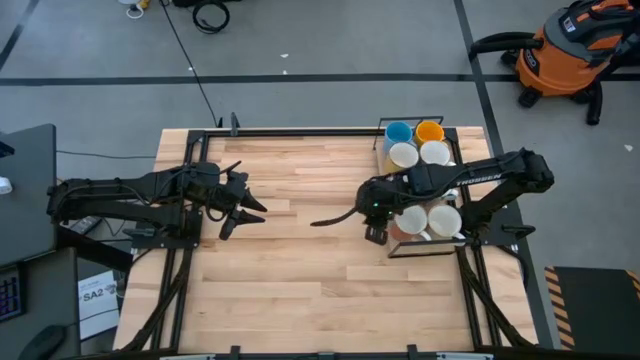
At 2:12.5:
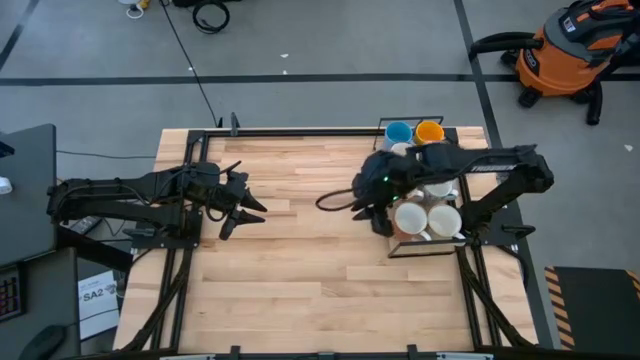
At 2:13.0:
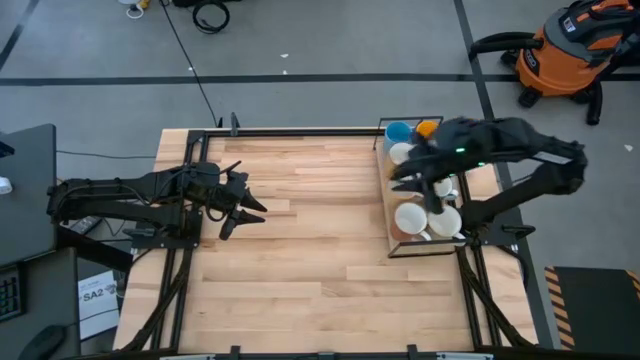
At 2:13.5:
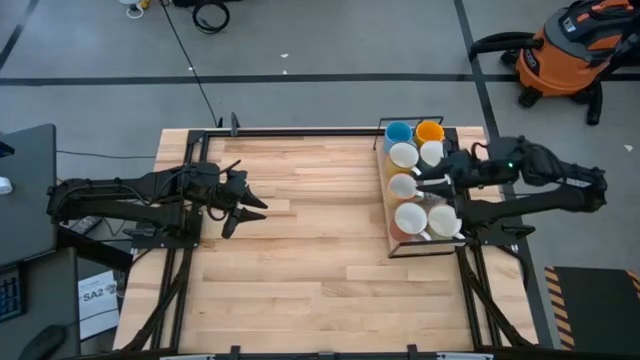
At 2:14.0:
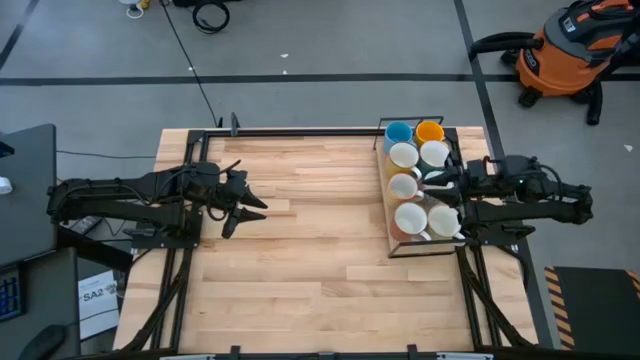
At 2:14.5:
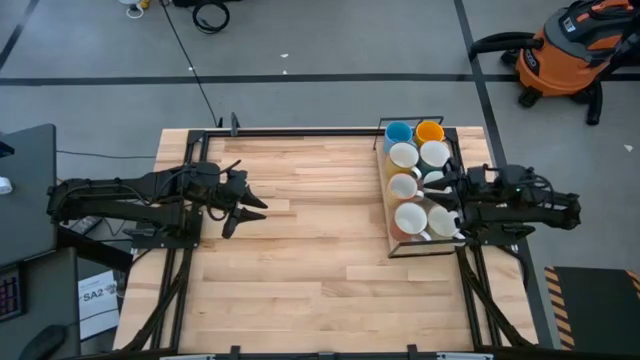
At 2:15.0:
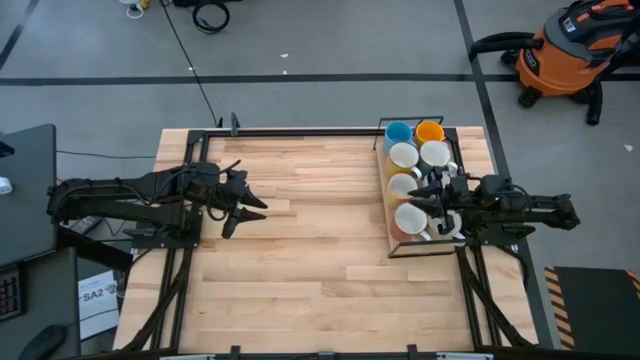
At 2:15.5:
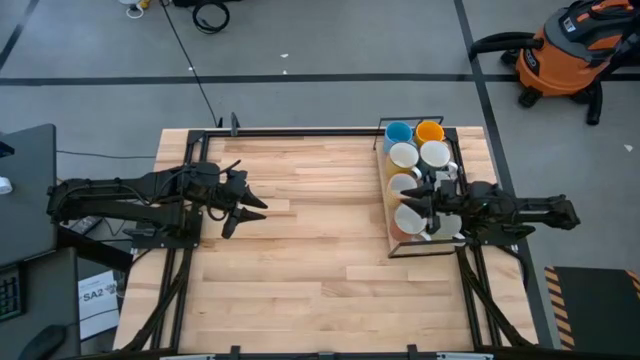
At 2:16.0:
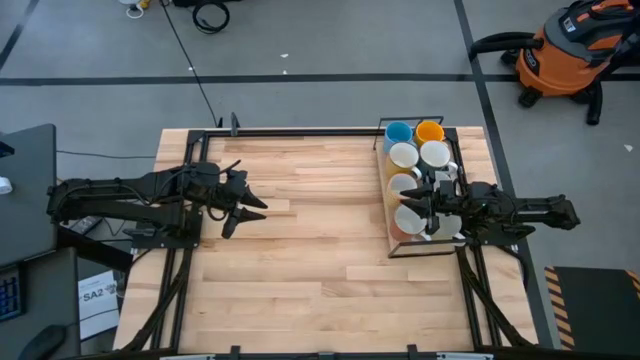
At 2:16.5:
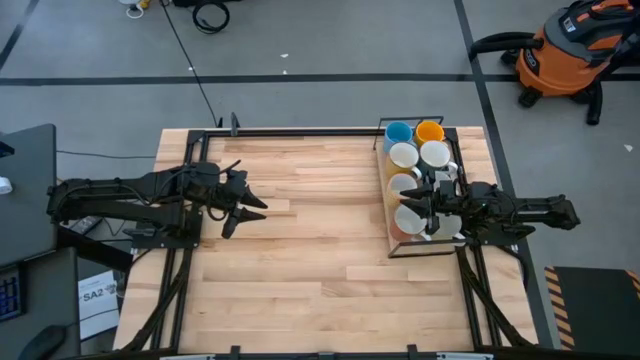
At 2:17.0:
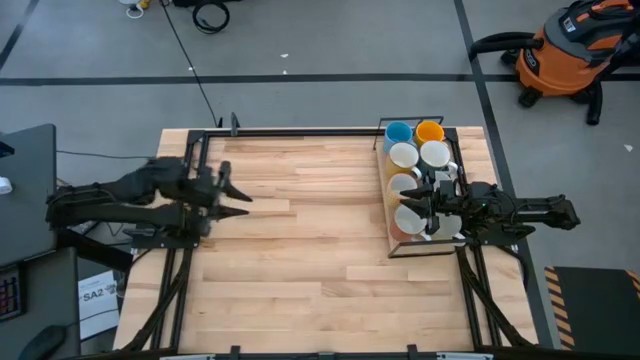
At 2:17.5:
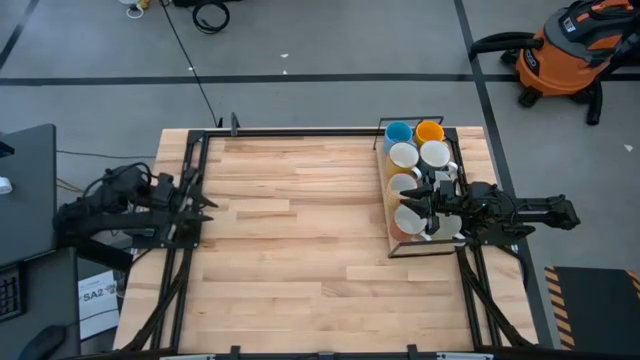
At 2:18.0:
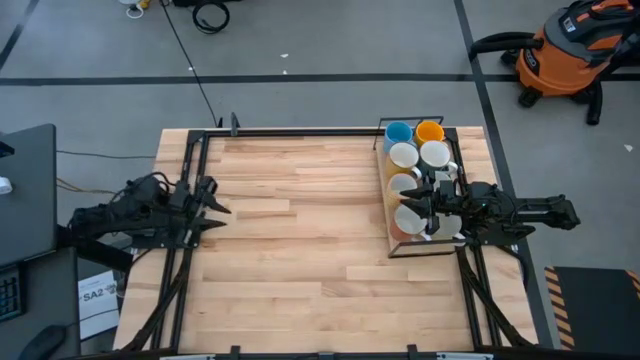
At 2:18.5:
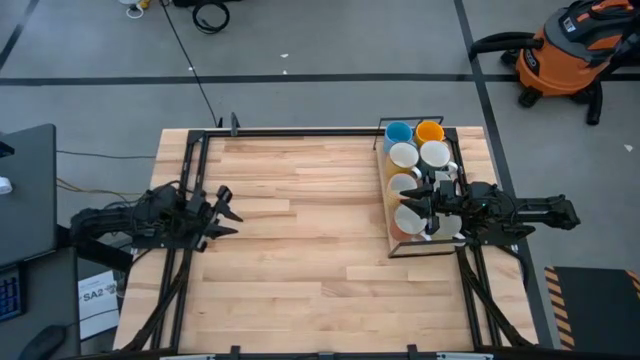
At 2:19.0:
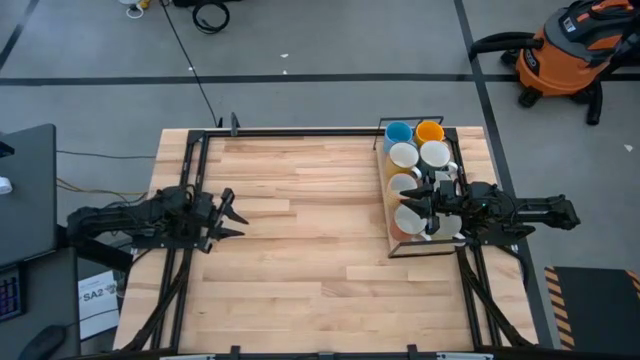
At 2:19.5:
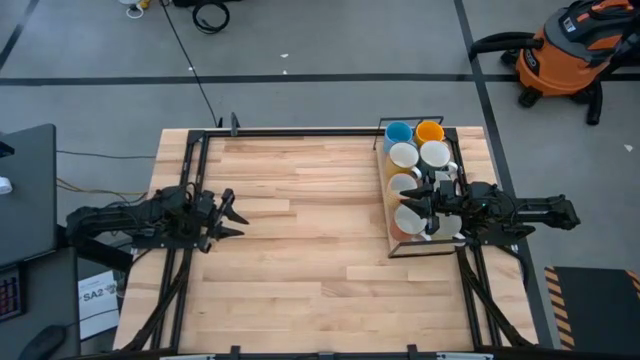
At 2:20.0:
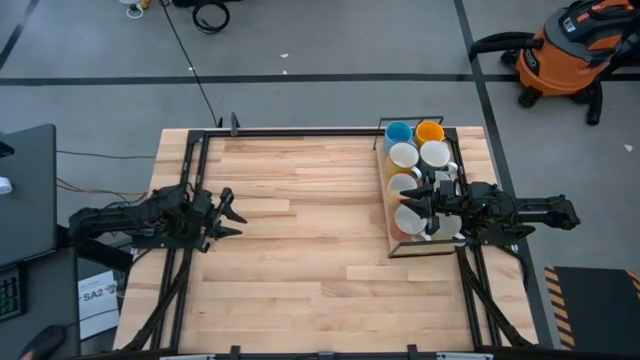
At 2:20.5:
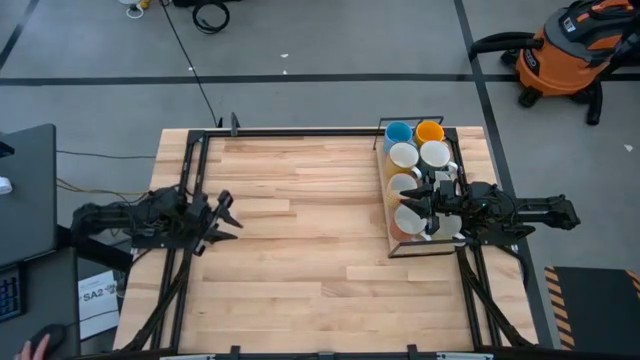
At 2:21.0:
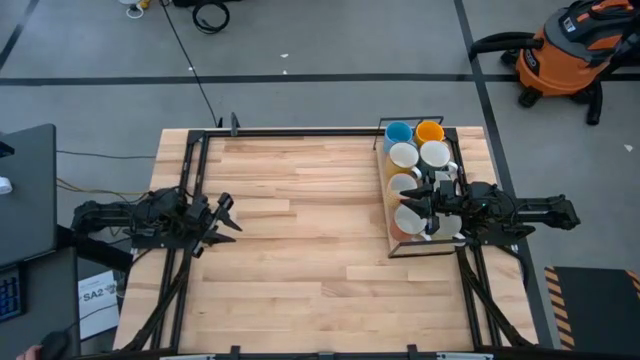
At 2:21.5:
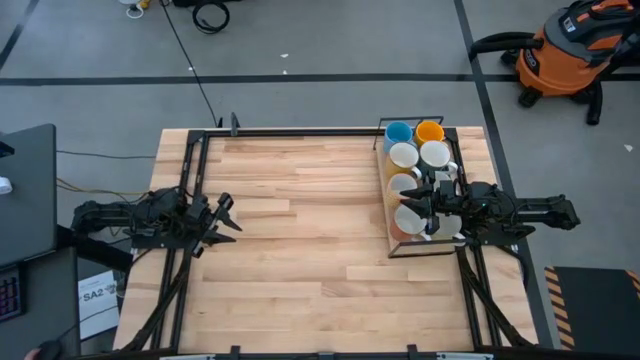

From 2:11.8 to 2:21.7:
Task: Place coffee mugs
Return to Home Position

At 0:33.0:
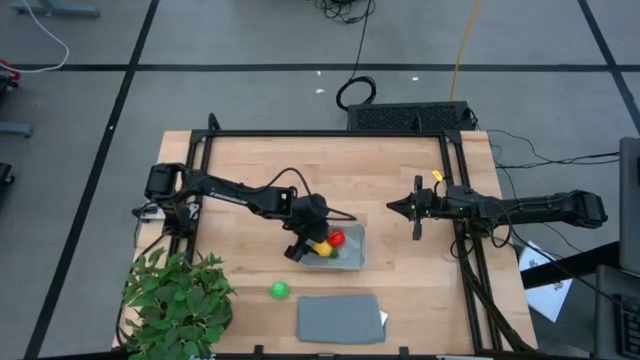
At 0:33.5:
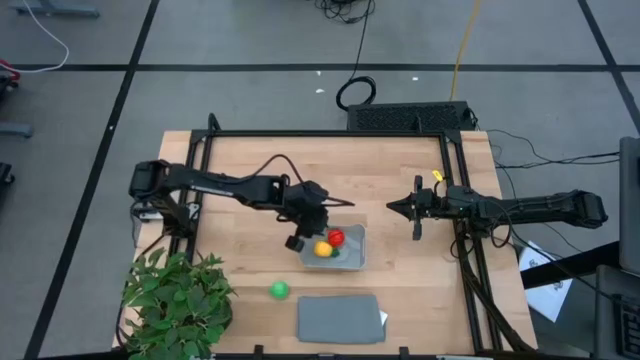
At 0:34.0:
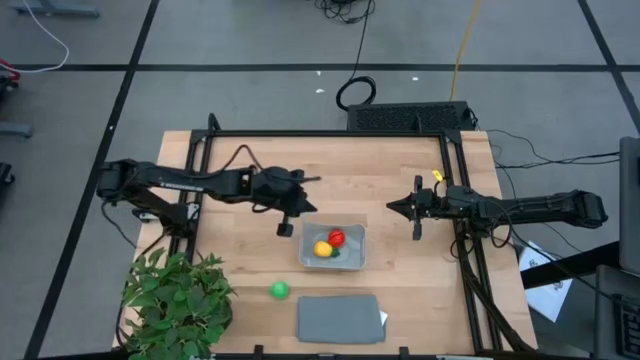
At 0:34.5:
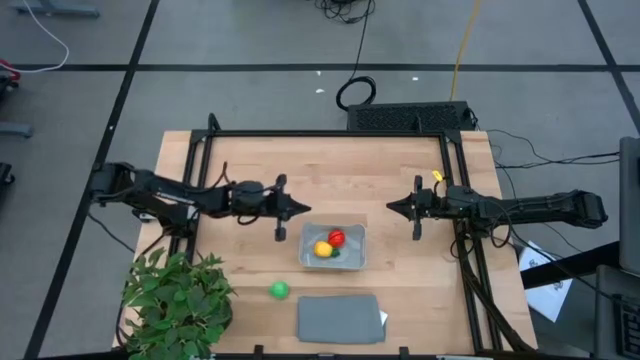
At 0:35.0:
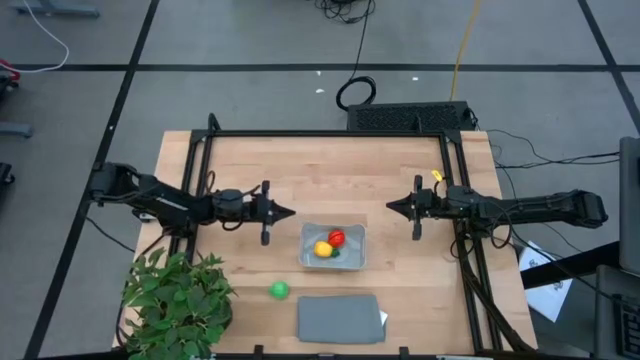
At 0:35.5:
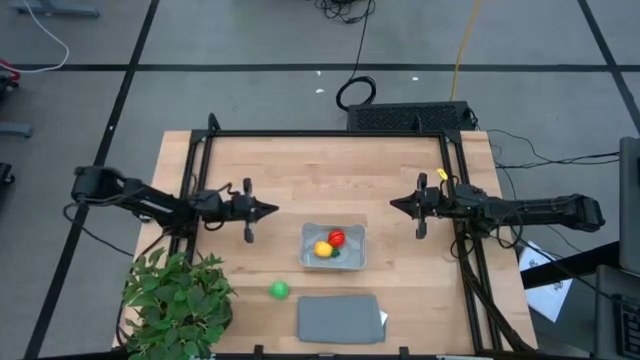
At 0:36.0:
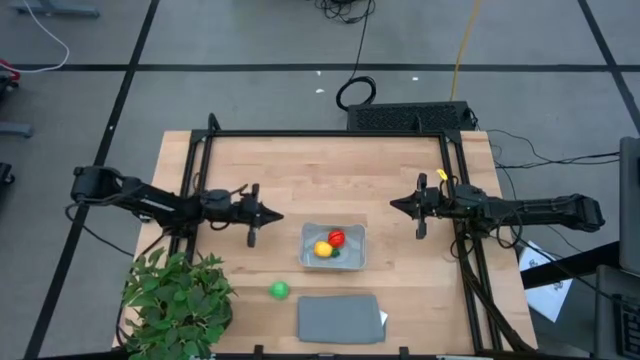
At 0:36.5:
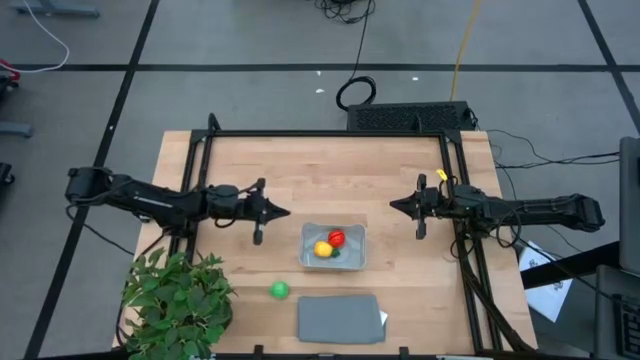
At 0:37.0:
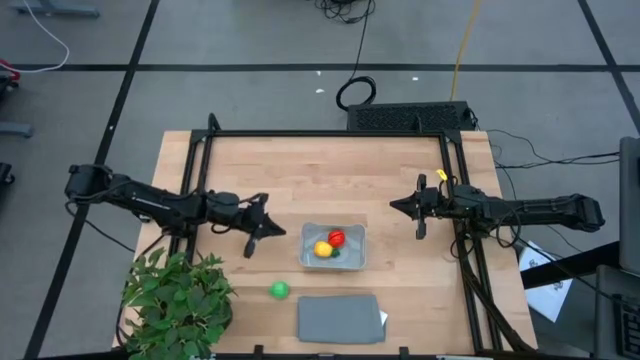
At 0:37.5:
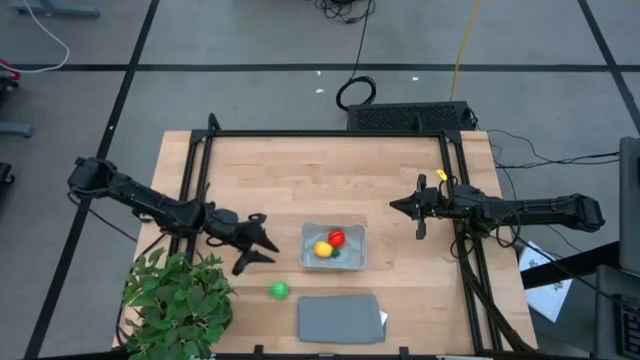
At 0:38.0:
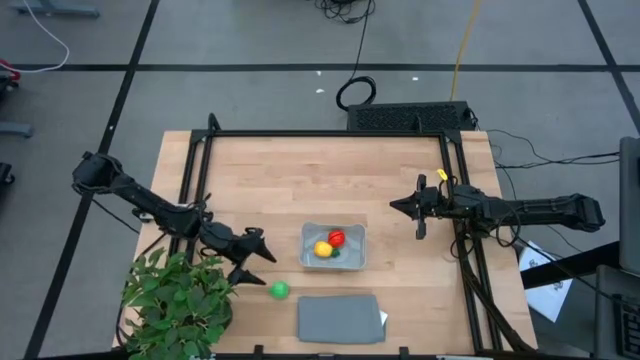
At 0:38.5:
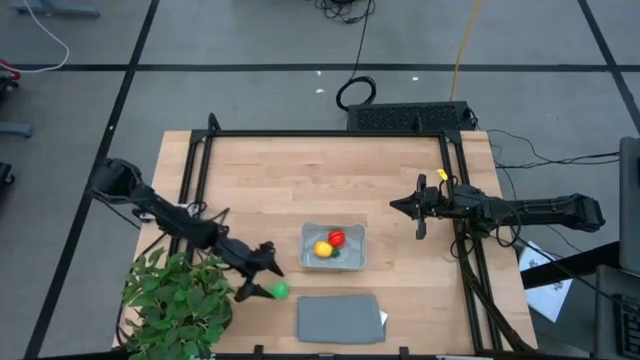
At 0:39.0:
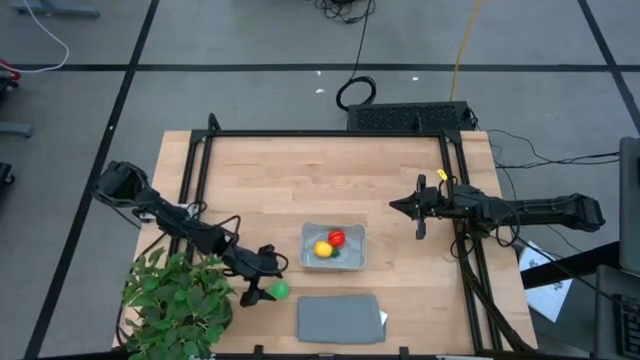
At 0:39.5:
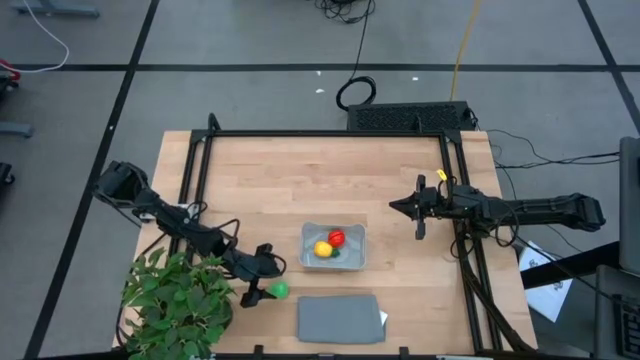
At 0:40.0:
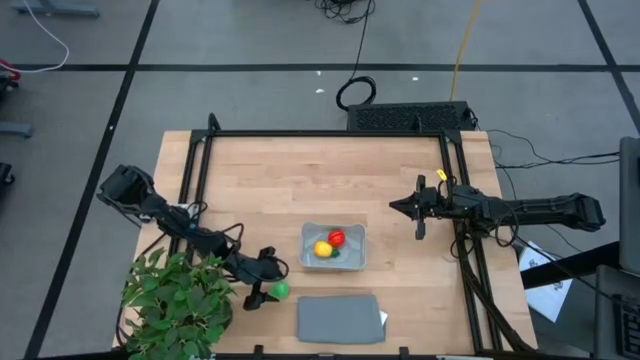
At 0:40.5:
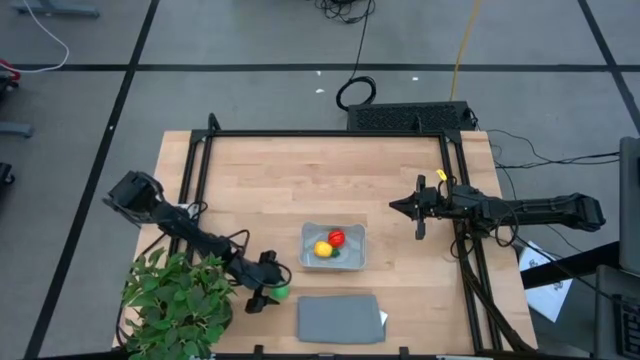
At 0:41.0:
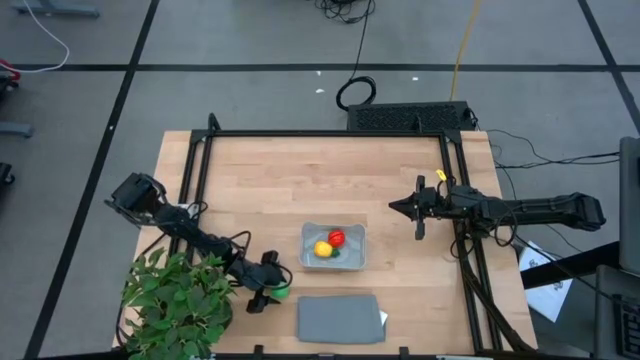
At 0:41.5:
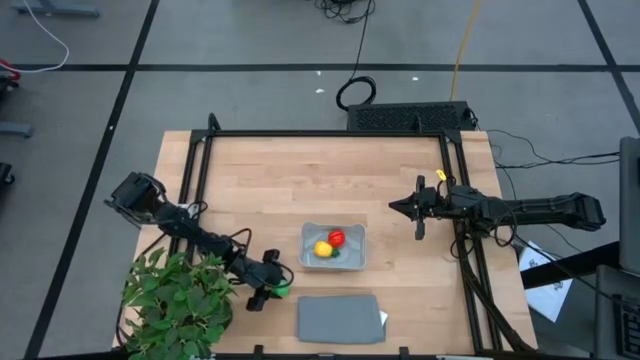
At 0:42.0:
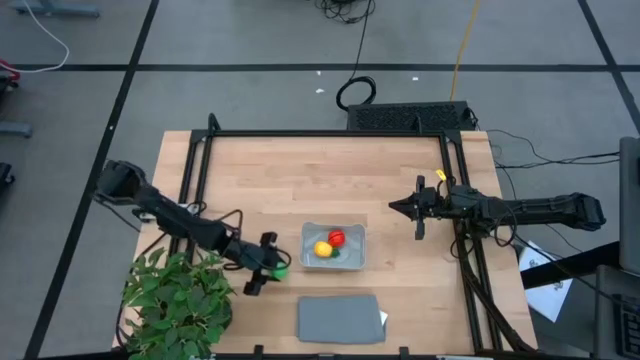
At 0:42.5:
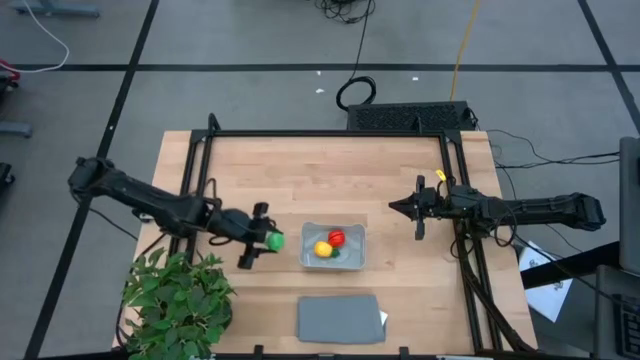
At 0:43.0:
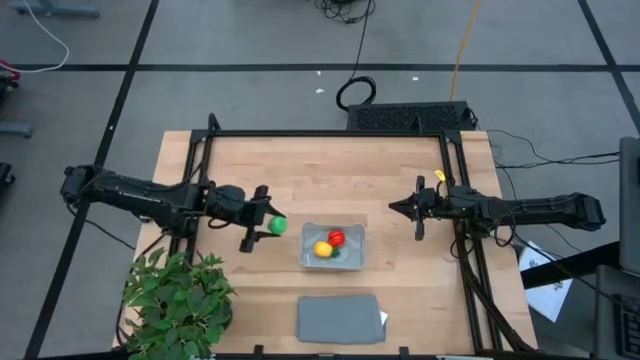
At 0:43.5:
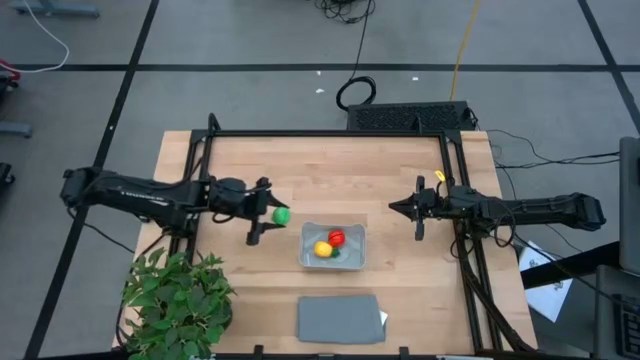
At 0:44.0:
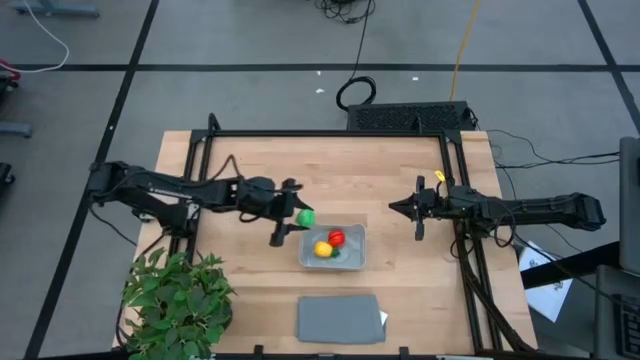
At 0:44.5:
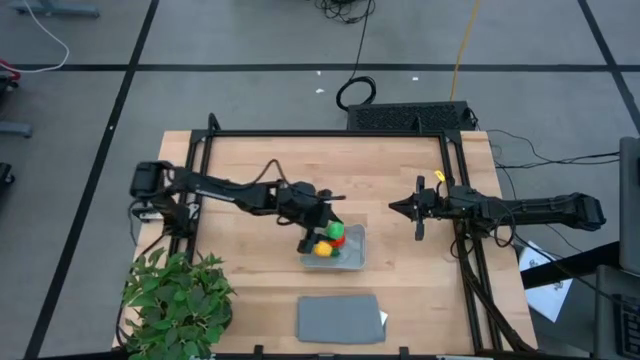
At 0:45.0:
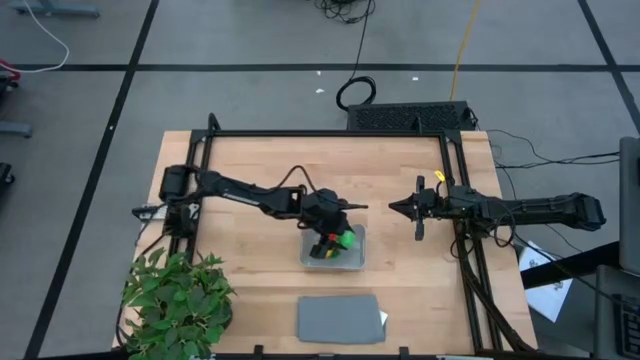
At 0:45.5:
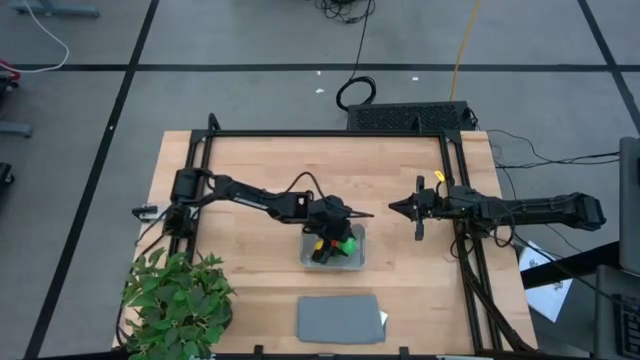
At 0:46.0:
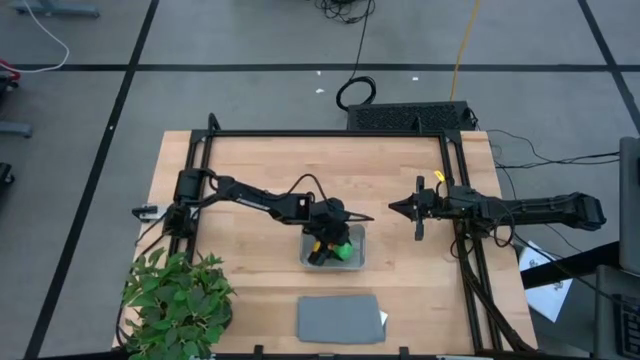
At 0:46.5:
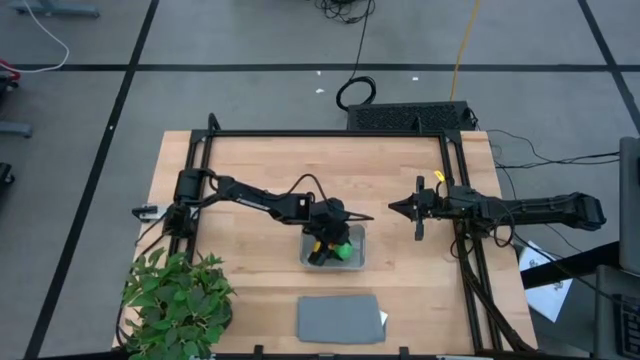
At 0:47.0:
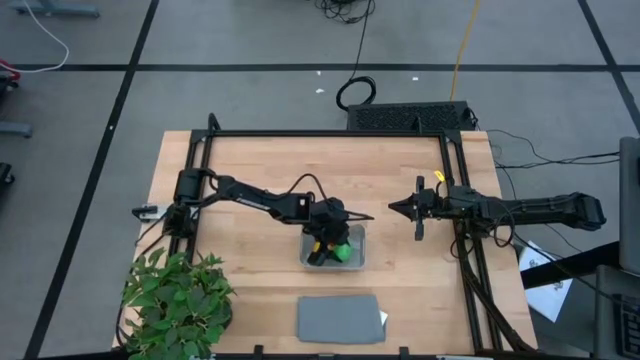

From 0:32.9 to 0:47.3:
Task: Pick and placing Produce into tupperware
Put the green pear into the gray bin
